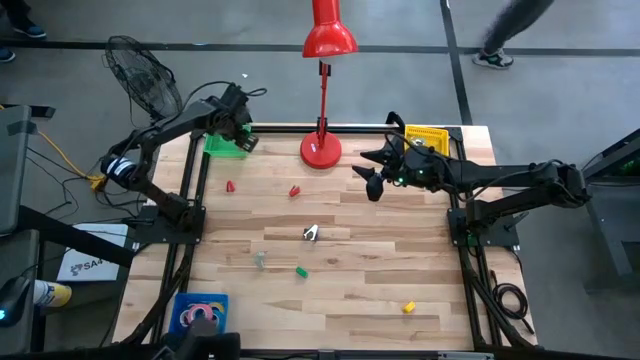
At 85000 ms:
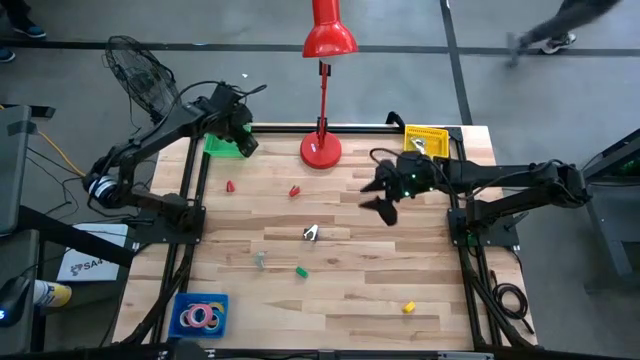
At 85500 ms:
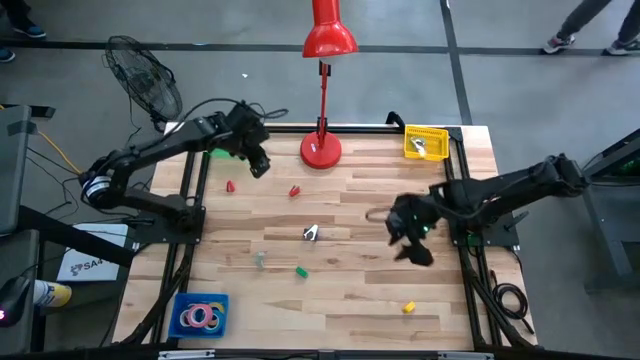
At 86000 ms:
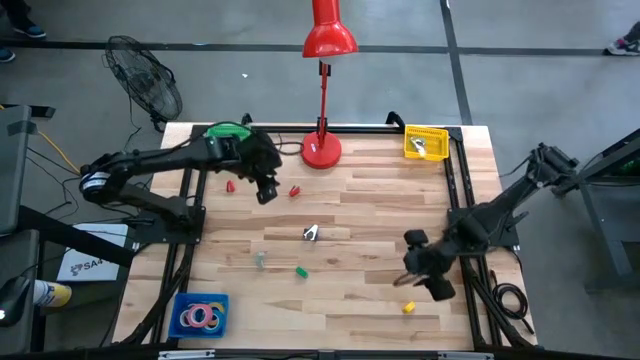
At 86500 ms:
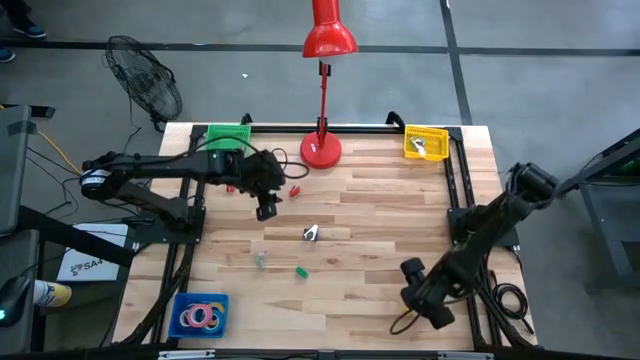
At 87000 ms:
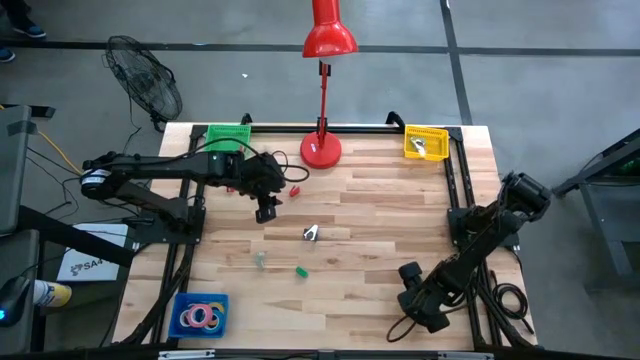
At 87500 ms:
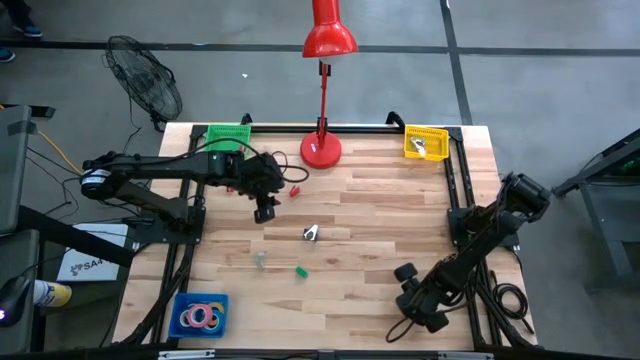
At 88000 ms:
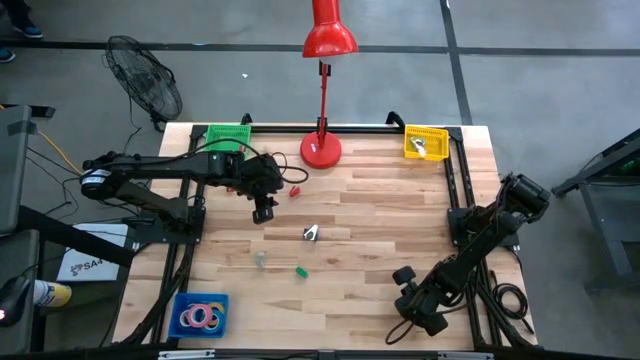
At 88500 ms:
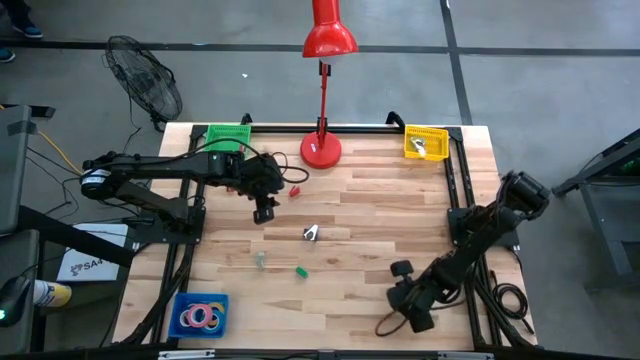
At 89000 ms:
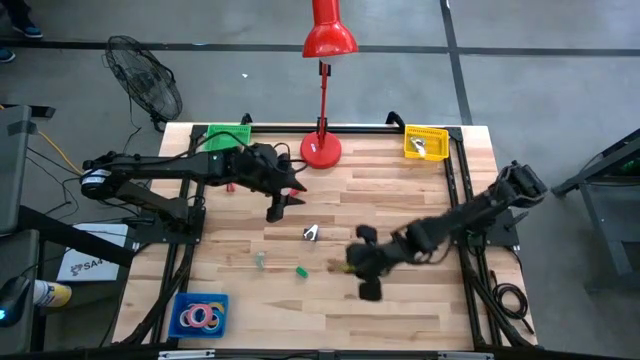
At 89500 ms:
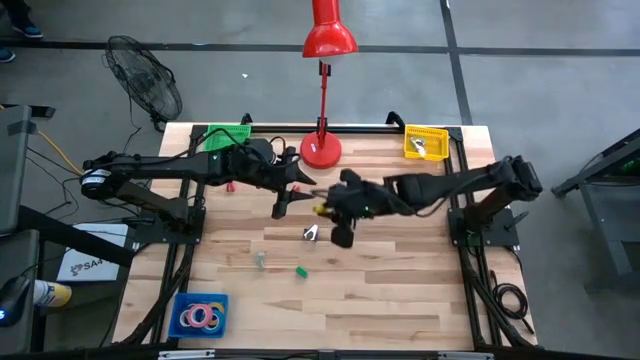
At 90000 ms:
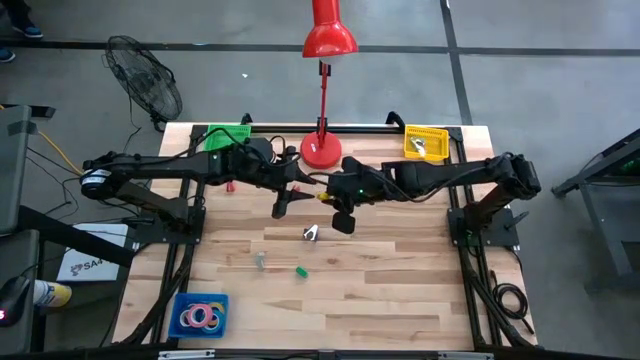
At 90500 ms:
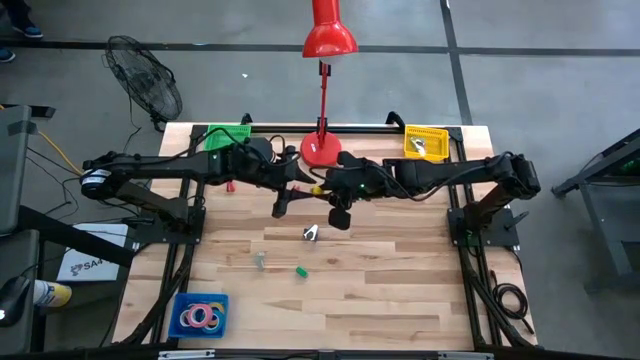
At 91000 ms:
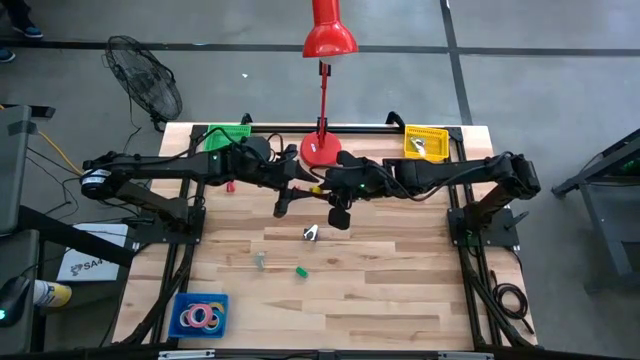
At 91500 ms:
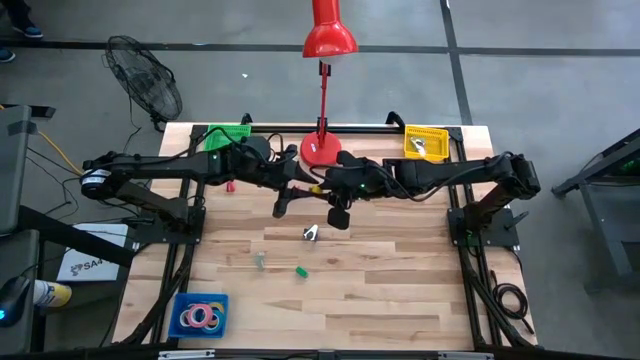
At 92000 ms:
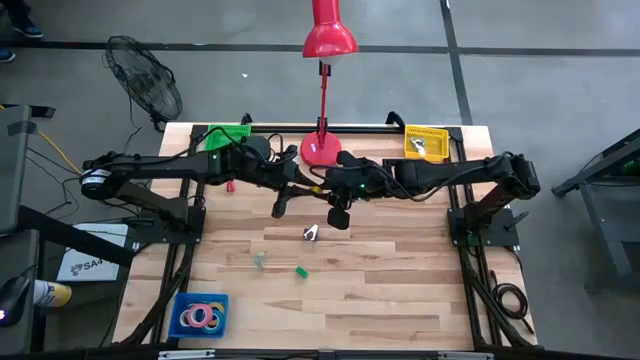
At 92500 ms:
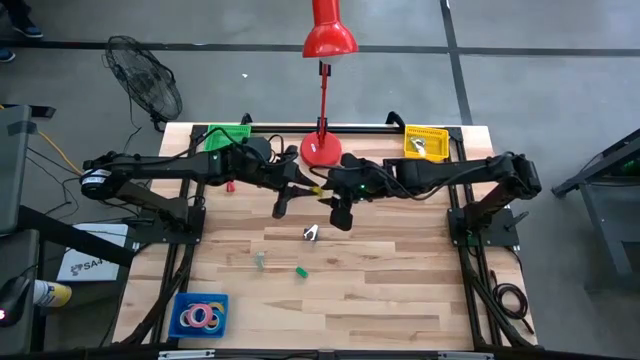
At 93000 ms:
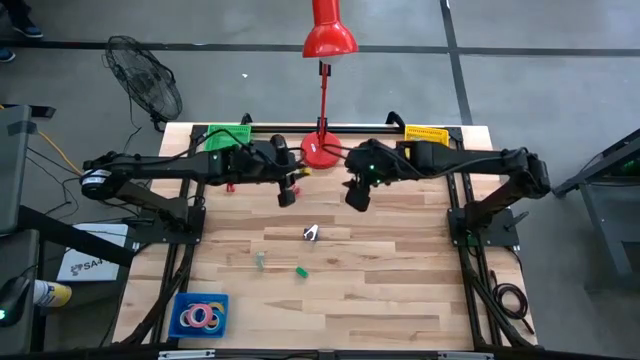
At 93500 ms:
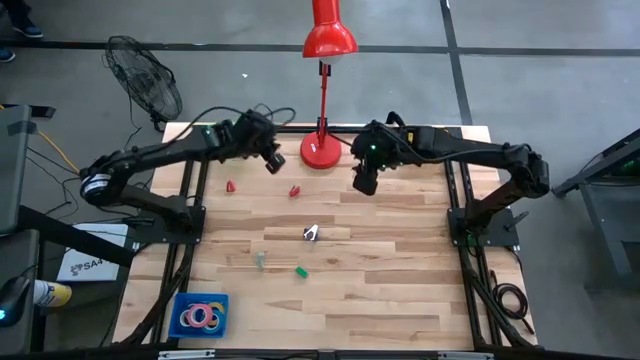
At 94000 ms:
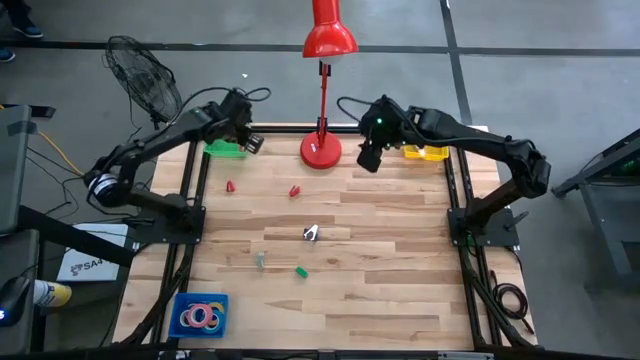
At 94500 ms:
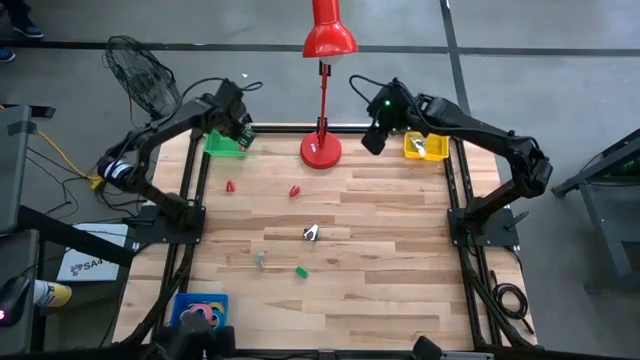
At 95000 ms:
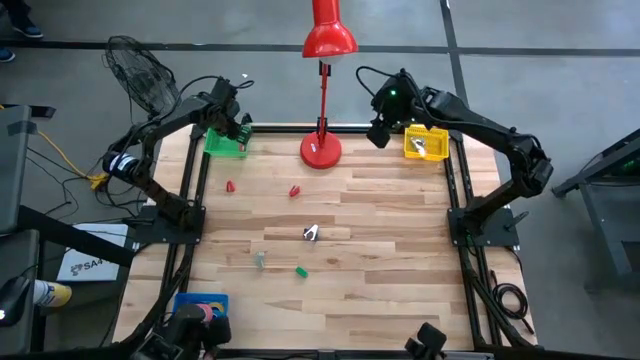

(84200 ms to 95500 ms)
Task: Pick and place Stapler, Stapler remover, tape
Put the yellow stapler into the green basket

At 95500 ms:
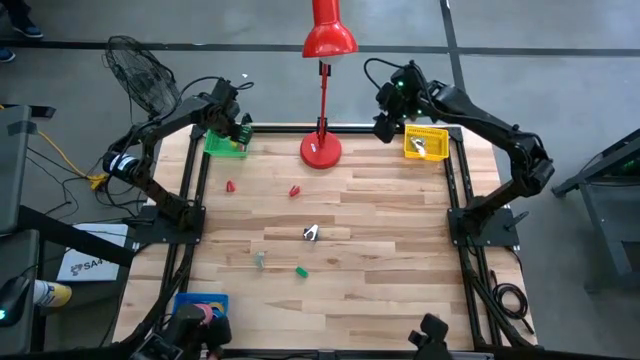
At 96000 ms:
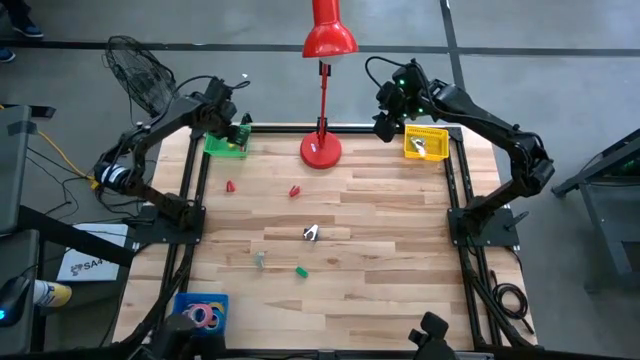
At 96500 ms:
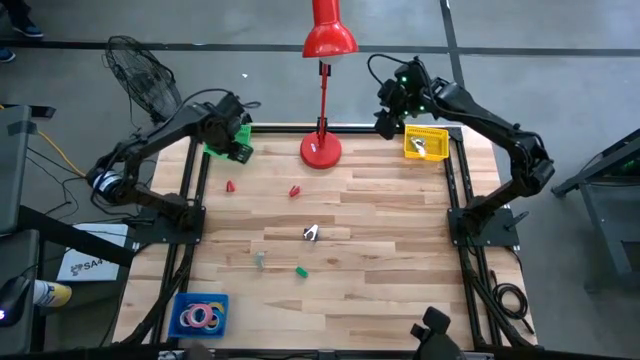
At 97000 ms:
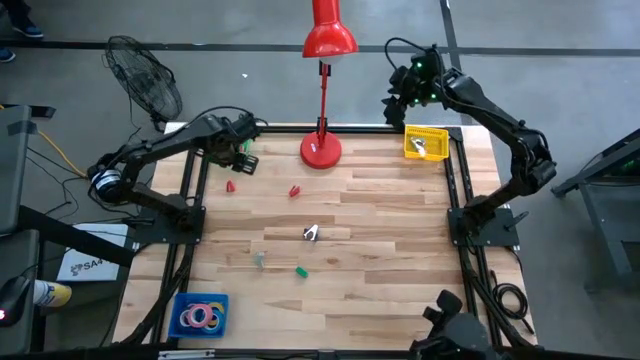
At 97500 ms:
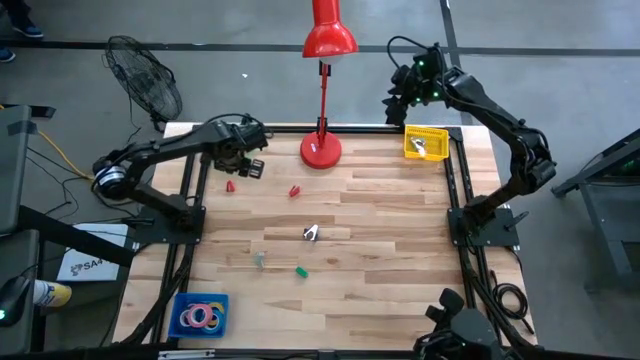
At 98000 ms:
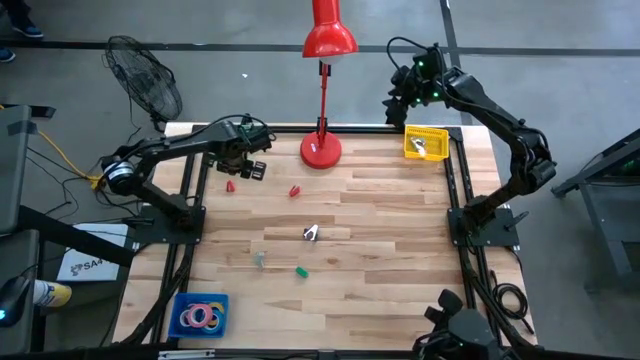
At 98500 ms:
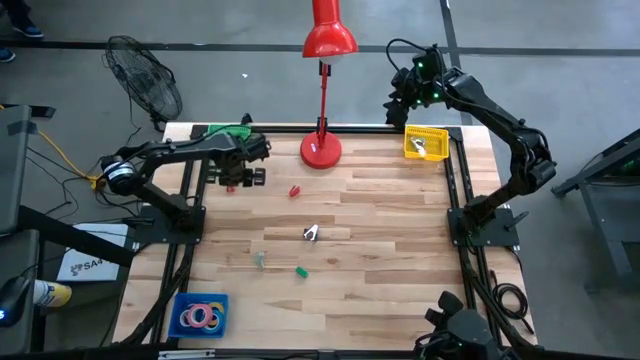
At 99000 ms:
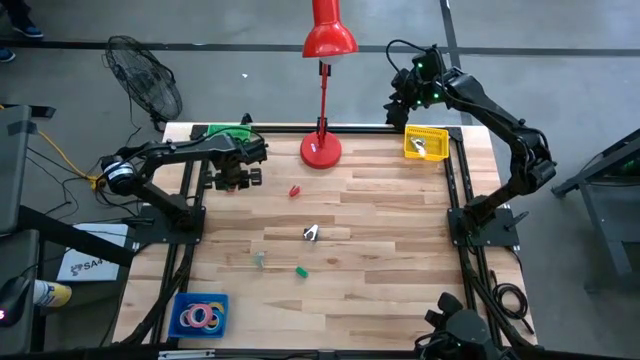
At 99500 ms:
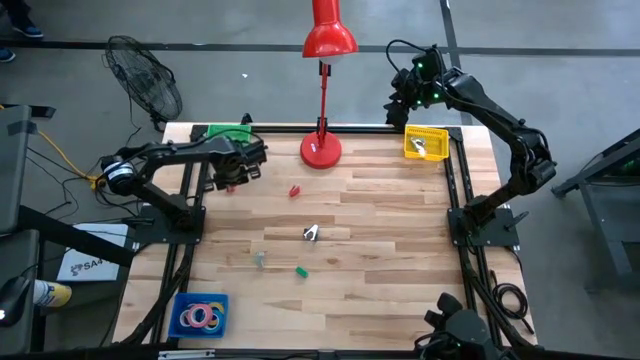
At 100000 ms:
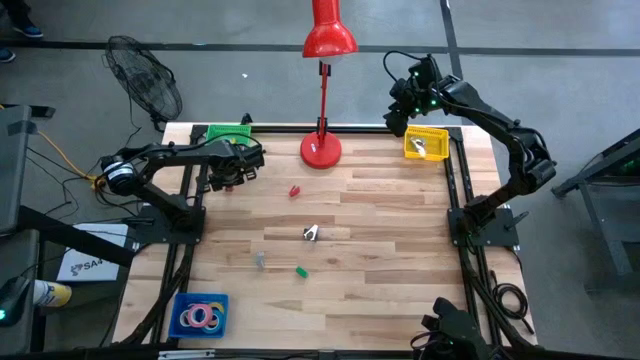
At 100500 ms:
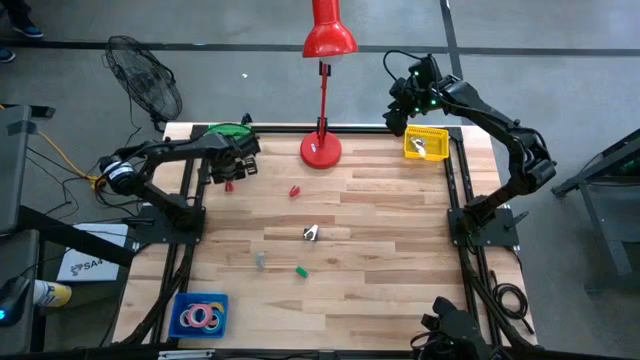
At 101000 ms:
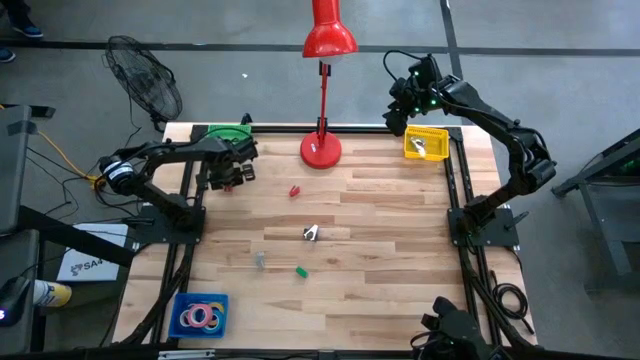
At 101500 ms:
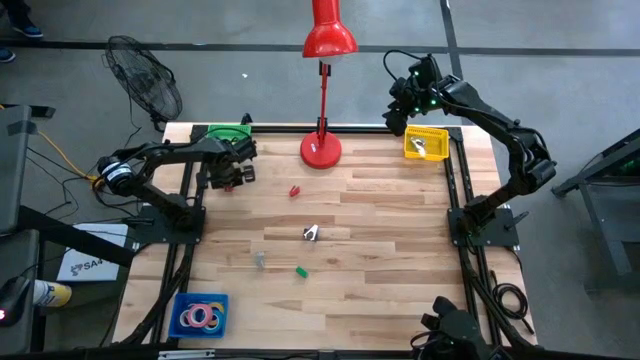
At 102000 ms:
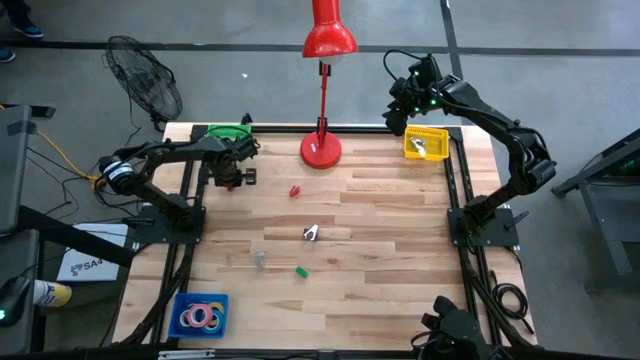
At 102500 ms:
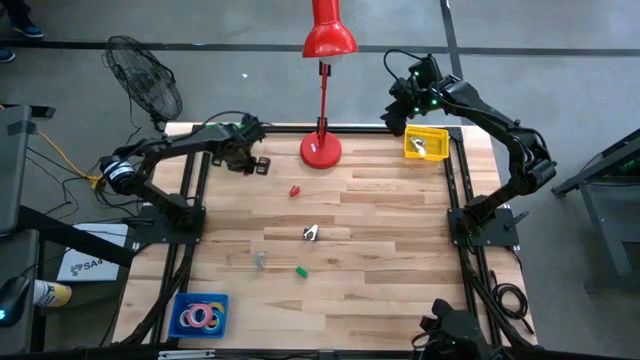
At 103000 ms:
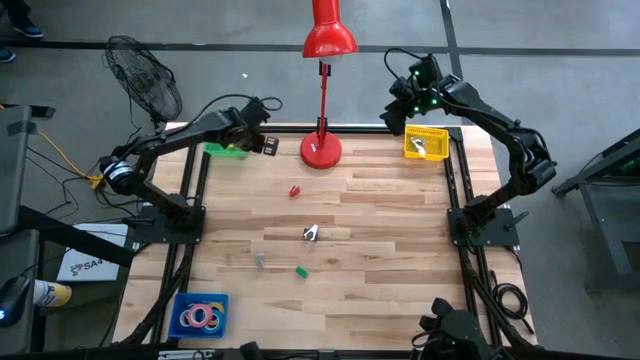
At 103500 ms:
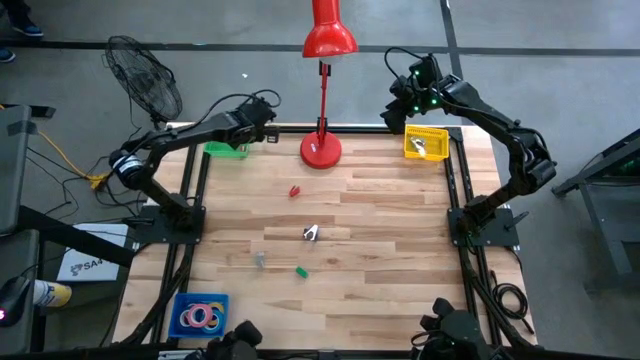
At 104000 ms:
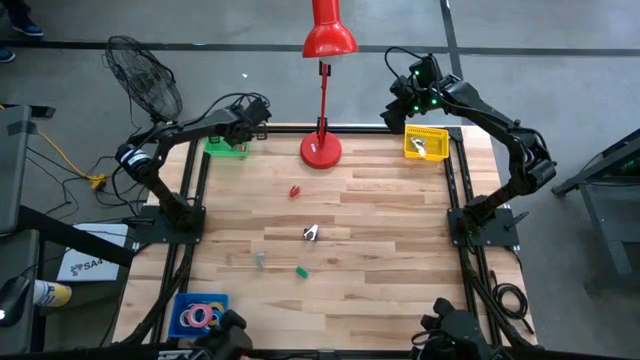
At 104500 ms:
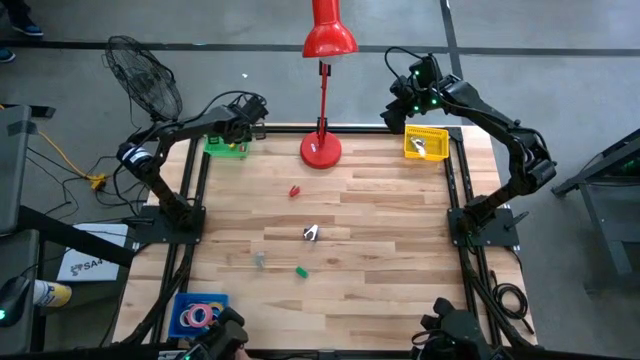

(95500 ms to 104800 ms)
Put the left red stapler into the green basket

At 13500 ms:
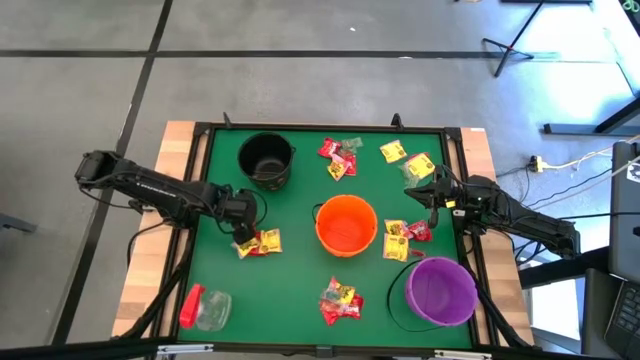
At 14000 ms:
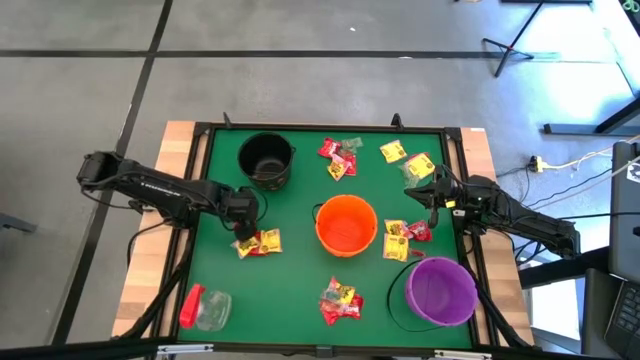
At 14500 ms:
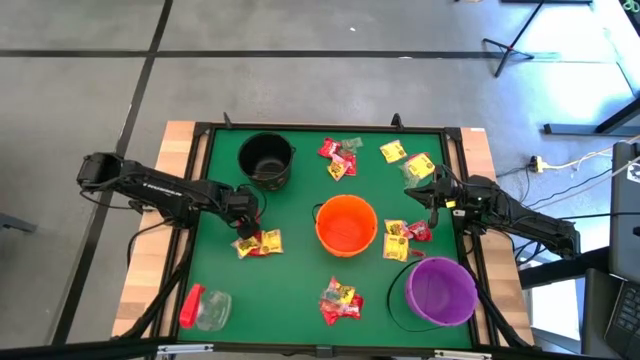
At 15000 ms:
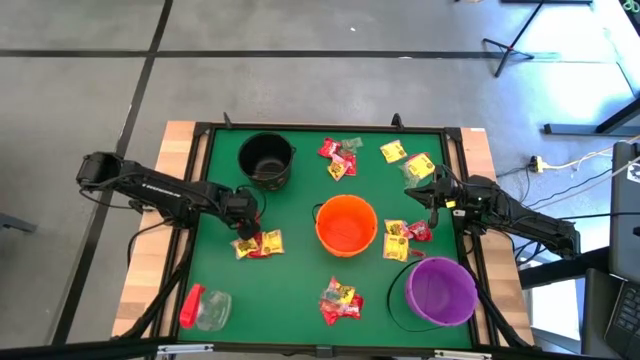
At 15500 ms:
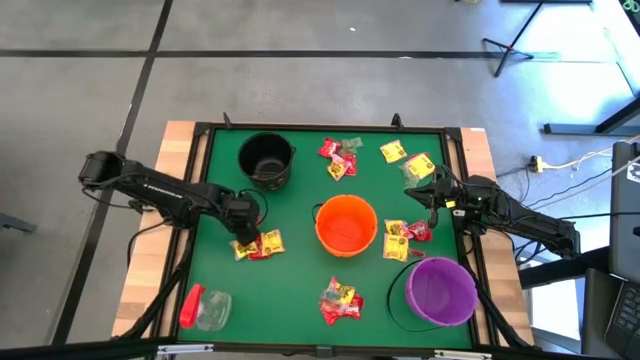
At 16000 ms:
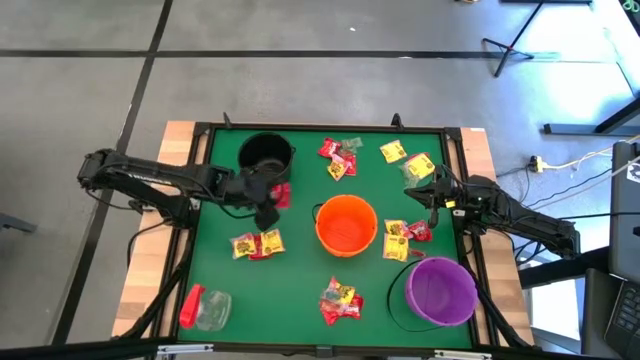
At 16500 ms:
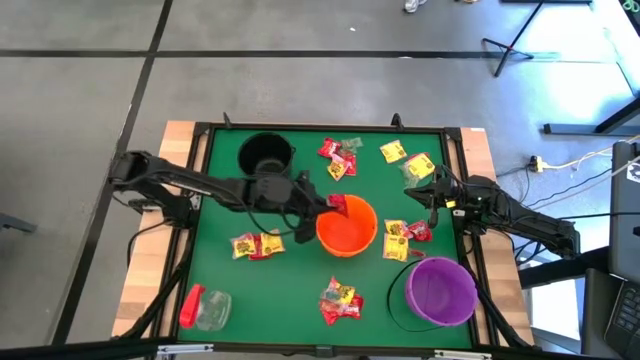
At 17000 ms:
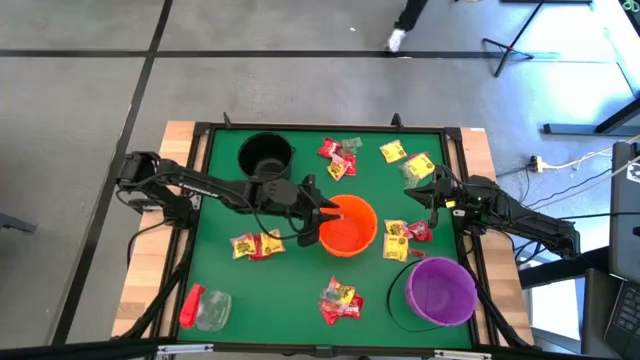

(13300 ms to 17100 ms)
Task: Sort candy
Put the red candy into the orange bin
